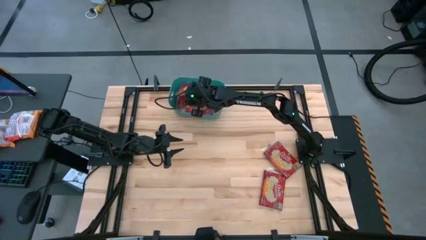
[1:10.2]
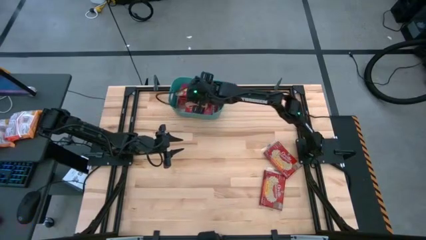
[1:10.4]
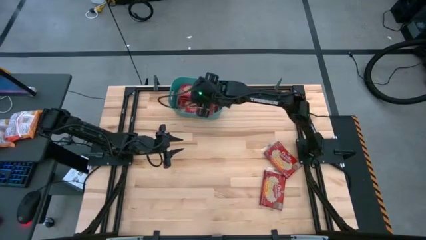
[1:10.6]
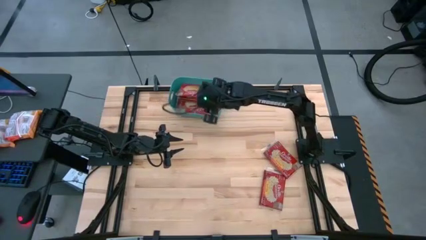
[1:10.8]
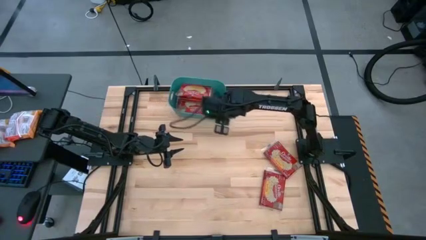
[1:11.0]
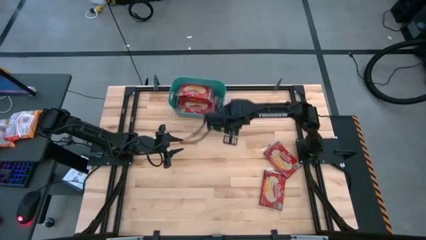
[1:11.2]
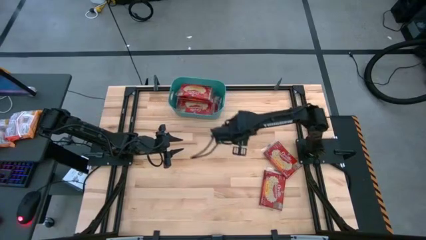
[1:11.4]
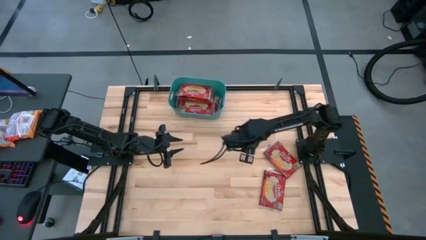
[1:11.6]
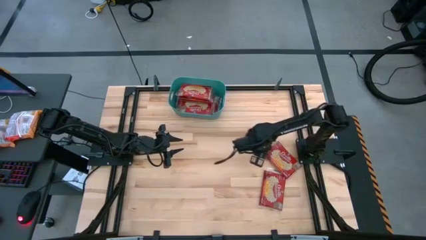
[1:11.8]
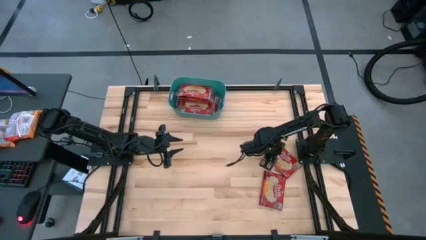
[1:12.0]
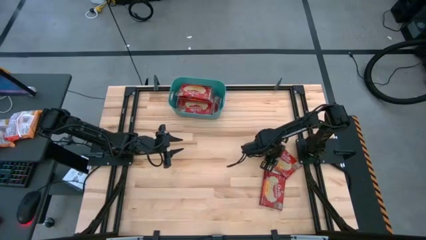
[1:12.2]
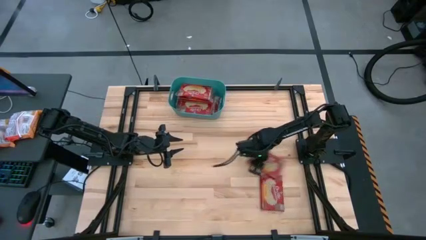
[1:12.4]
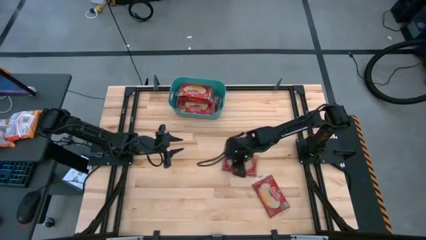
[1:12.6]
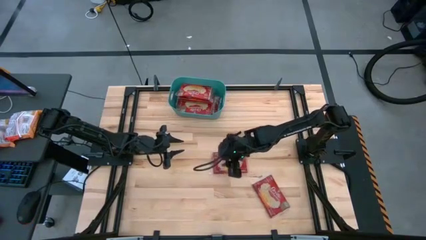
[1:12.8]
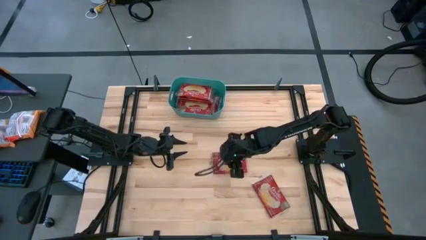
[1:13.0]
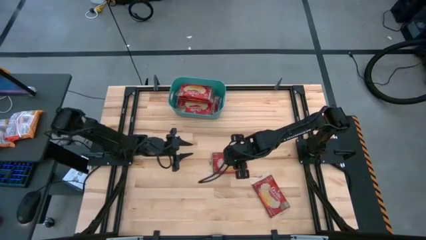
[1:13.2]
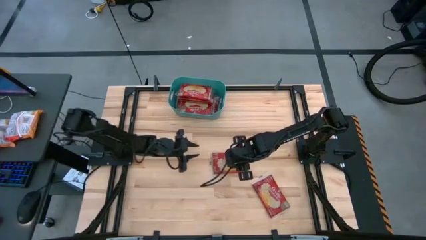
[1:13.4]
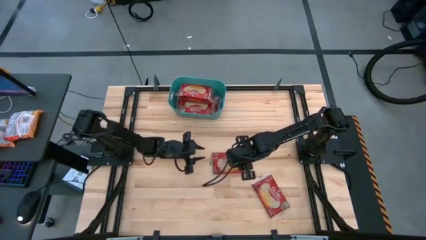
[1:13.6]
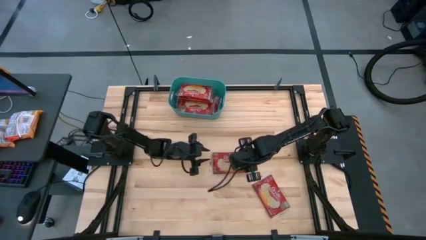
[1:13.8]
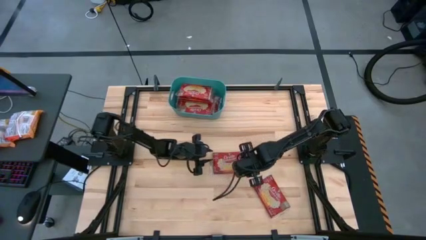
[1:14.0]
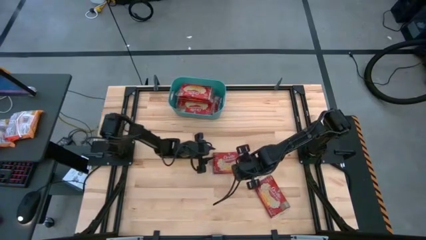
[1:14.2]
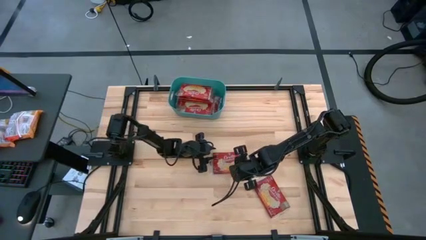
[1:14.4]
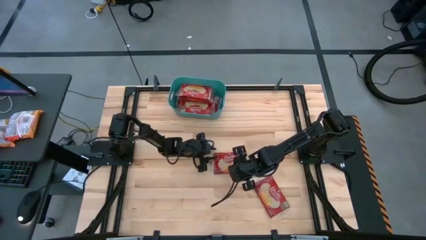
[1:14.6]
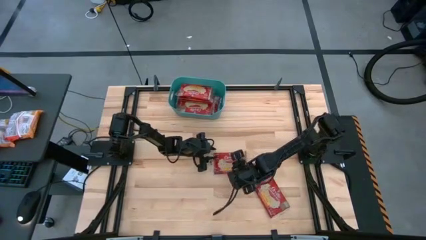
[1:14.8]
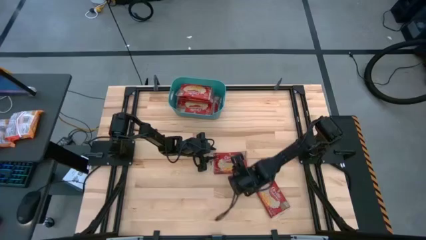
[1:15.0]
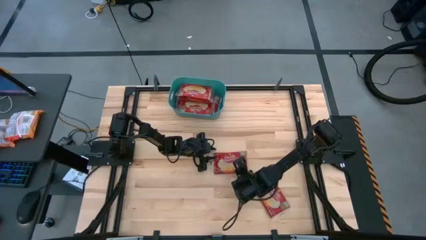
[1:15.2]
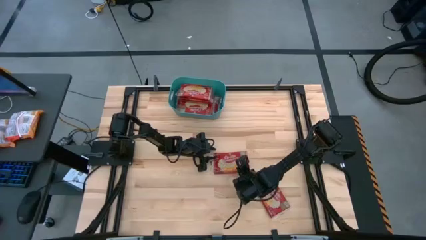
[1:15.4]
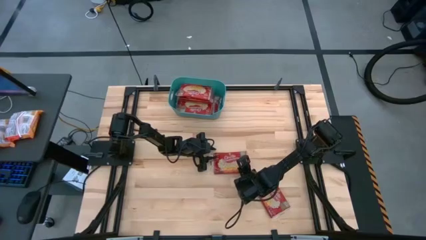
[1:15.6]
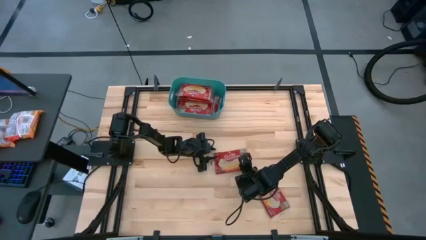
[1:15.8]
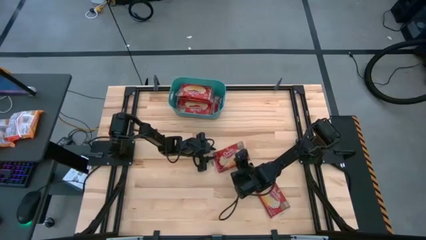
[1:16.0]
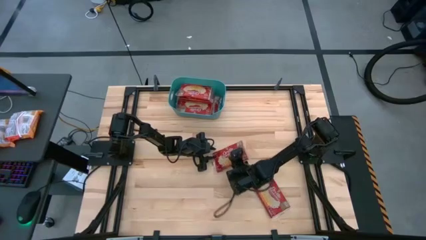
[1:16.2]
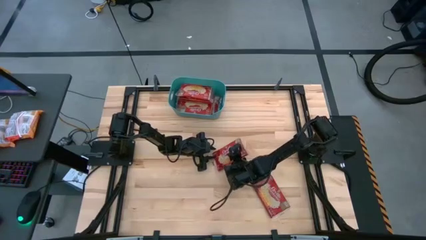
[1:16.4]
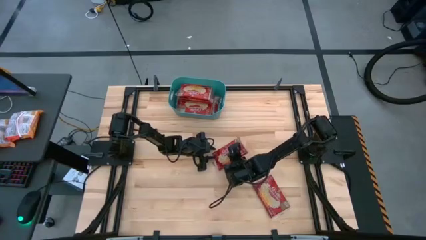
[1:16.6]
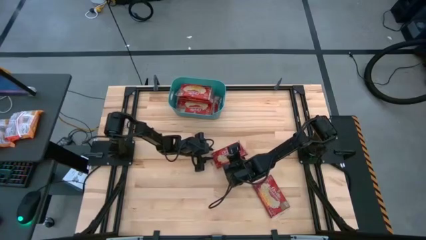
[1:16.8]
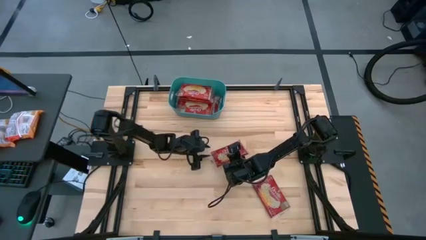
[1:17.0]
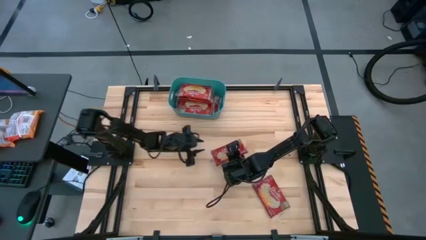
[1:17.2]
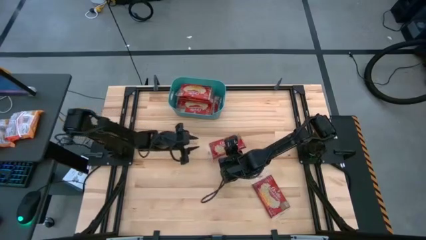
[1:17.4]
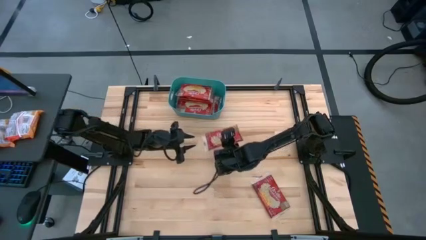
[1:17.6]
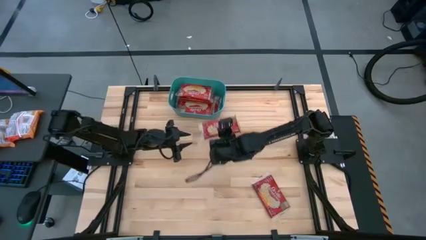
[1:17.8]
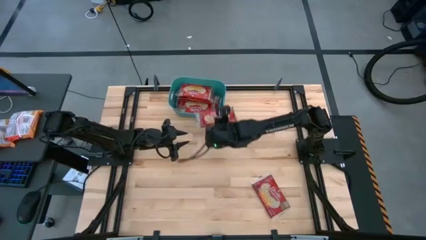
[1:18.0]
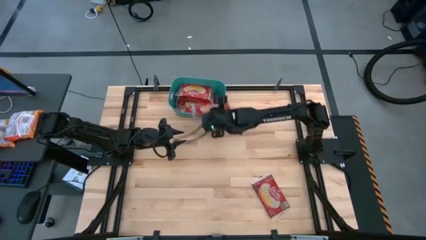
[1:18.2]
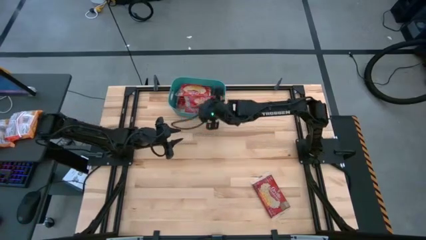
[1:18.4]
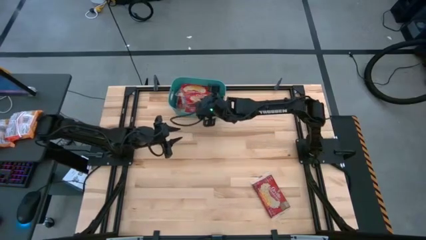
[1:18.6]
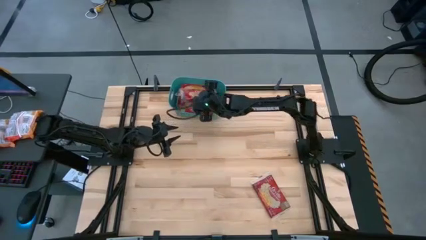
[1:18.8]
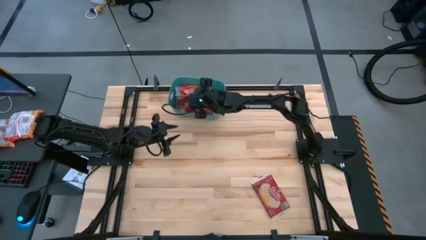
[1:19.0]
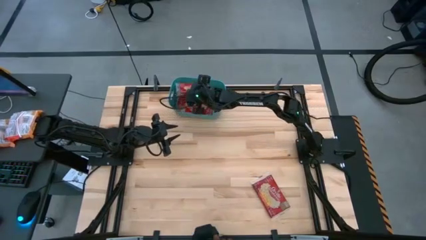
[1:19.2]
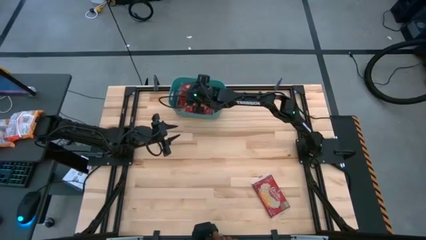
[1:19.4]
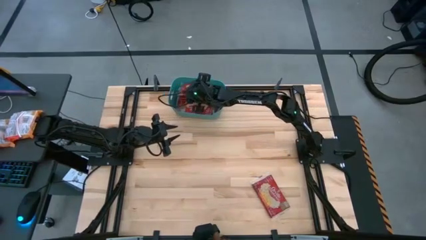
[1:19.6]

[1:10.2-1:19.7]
Task: Sort popcorn bags into baskets
Put the red popcorn bag into the green bin

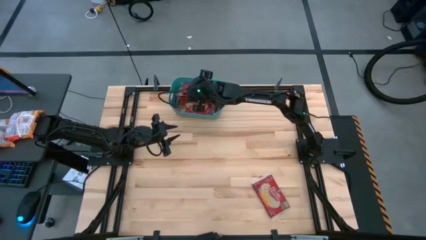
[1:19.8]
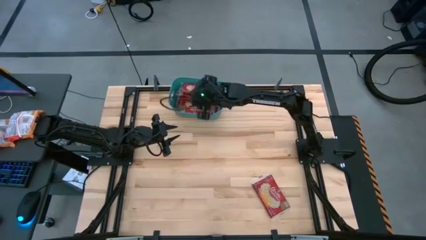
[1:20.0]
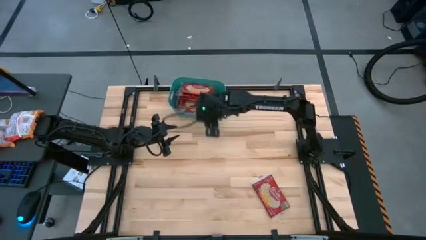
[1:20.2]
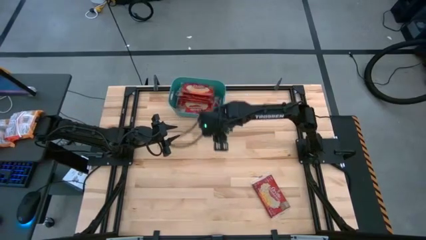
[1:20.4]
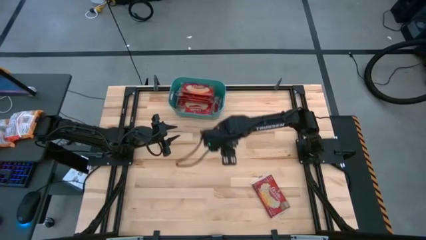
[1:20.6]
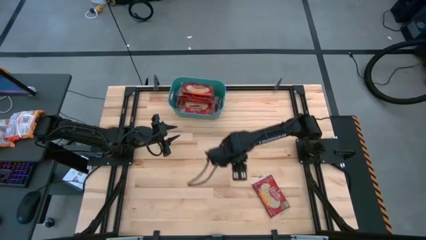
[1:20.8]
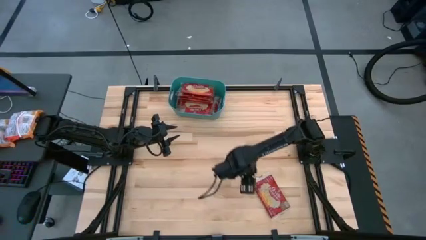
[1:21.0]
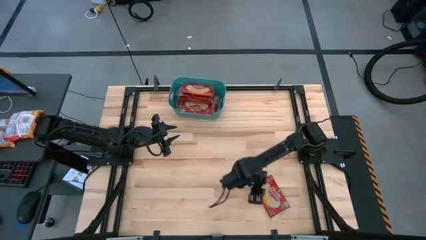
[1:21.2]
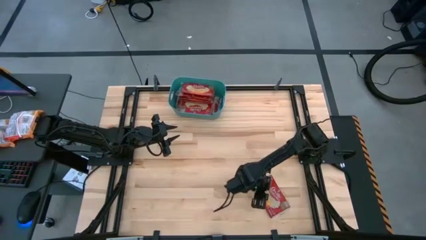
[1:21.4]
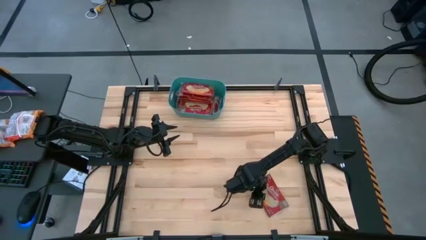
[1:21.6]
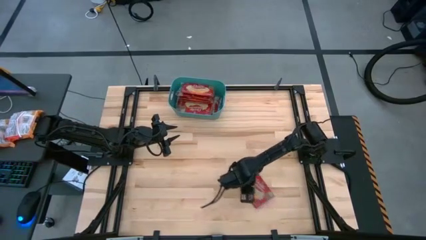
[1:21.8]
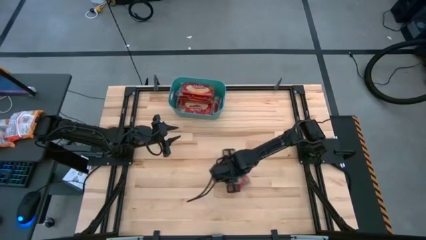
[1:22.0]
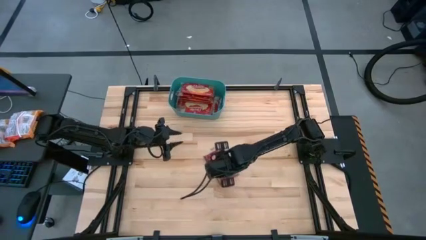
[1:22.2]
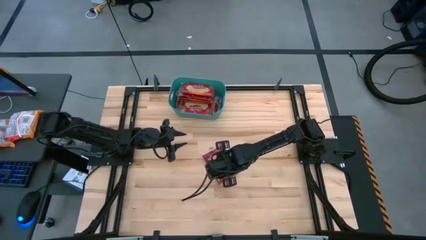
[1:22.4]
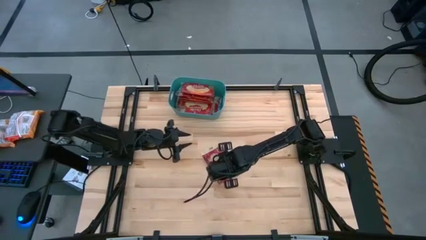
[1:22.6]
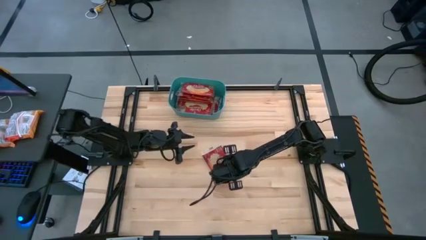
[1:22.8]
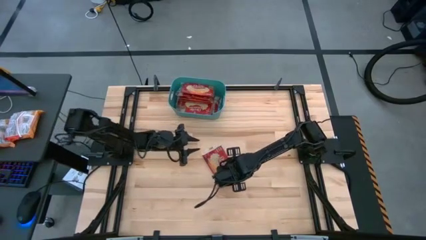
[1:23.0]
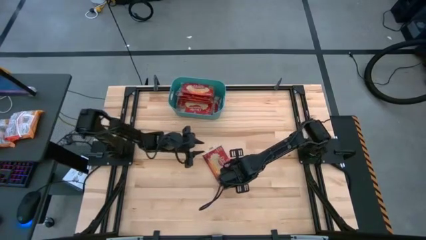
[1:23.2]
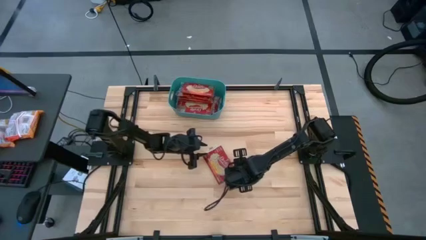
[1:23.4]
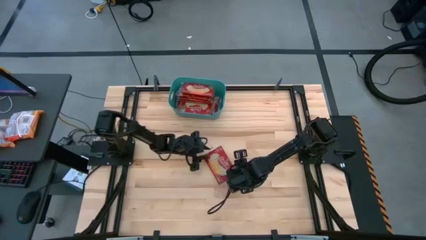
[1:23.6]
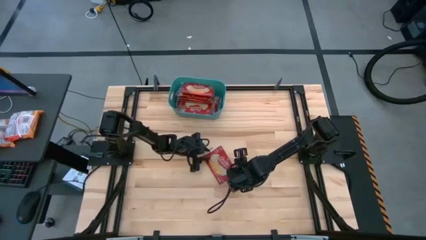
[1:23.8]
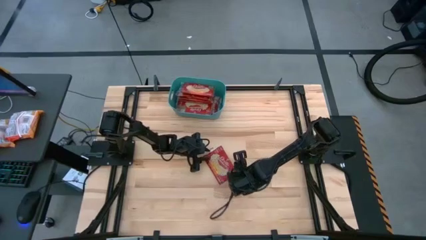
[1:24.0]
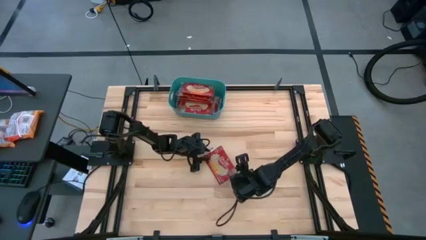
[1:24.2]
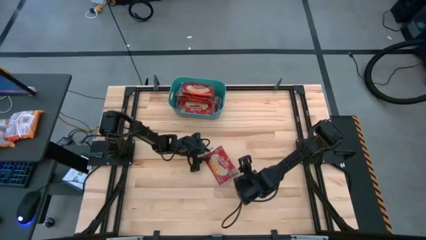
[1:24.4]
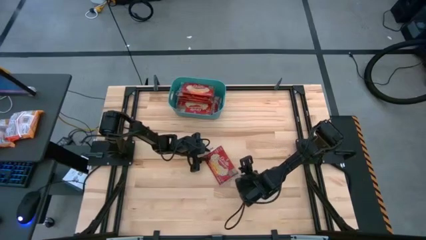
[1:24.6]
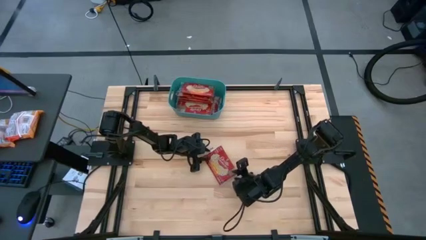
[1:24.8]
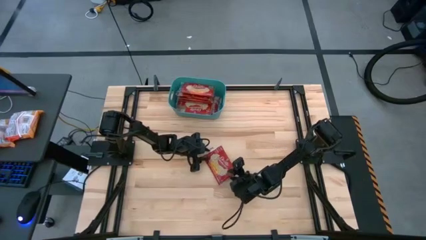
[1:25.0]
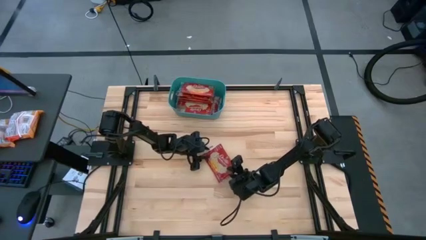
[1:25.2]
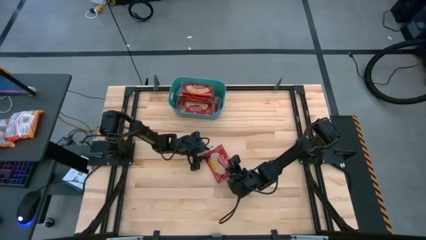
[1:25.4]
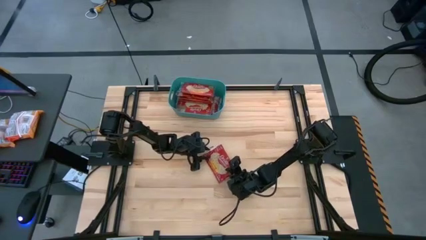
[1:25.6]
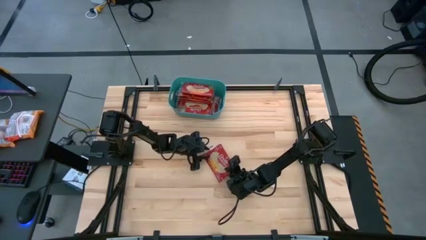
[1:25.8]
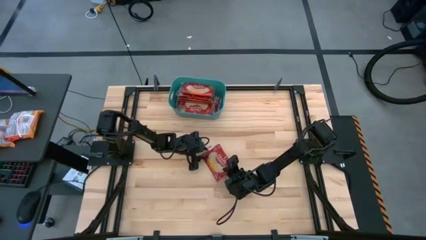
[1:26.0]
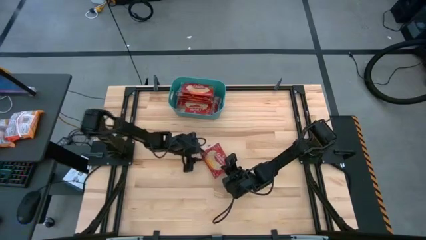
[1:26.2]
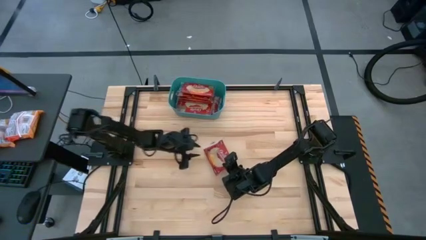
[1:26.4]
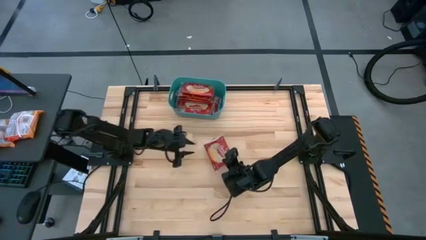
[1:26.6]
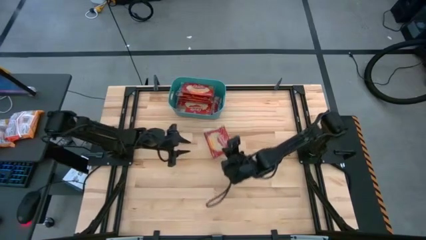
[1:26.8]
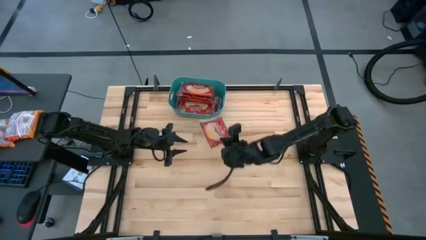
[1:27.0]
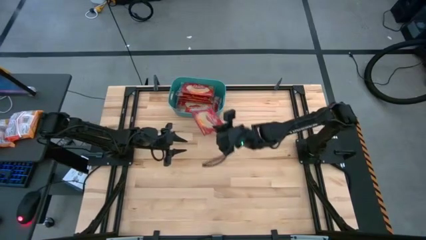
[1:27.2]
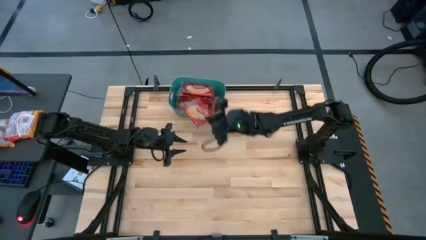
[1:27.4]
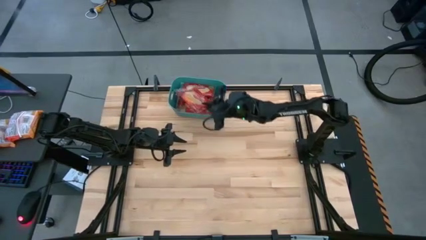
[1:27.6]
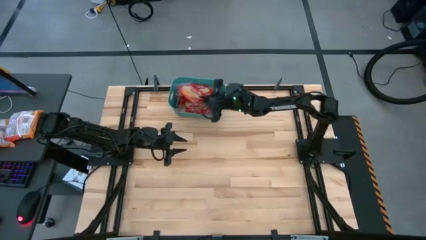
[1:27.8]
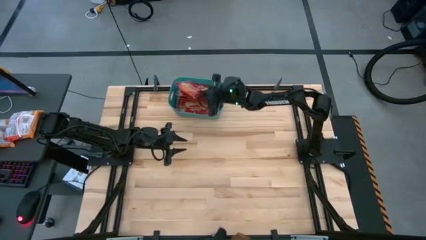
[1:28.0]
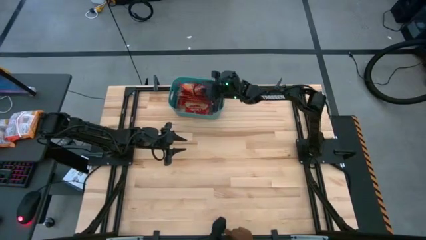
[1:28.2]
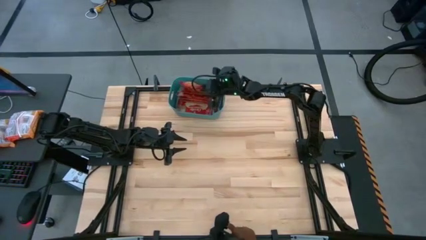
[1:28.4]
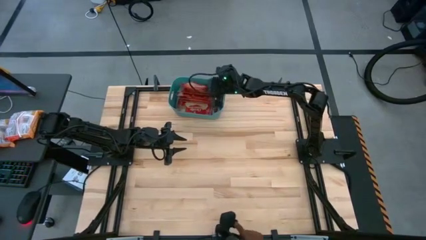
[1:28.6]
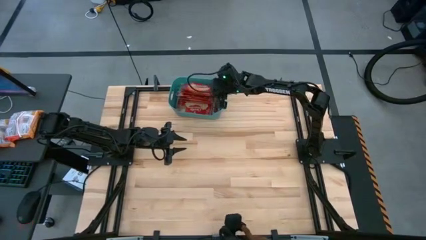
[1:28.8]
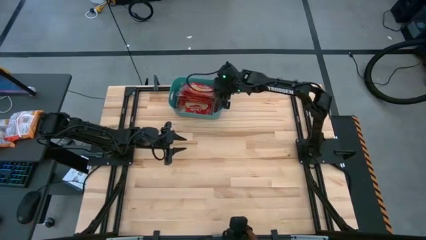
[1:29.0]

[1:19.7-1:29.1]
Put the red popcorn bag into the green bin
